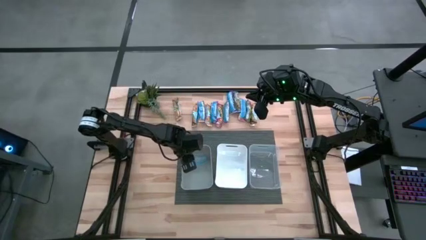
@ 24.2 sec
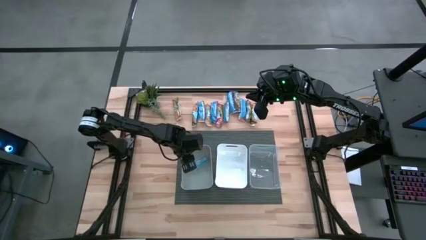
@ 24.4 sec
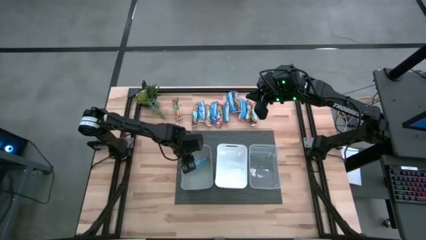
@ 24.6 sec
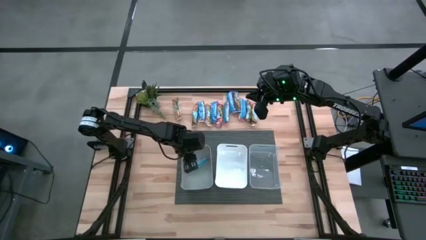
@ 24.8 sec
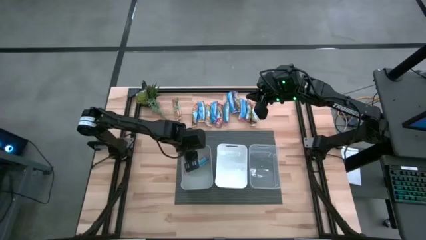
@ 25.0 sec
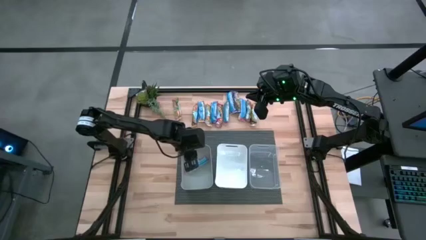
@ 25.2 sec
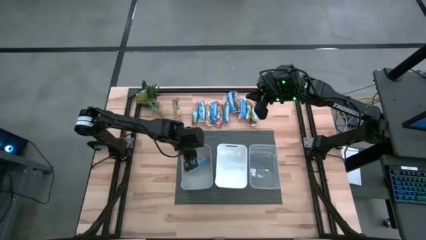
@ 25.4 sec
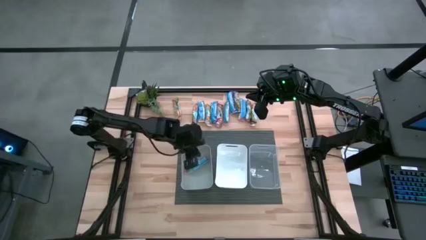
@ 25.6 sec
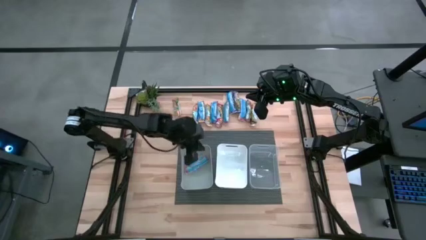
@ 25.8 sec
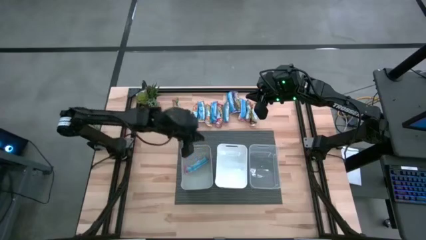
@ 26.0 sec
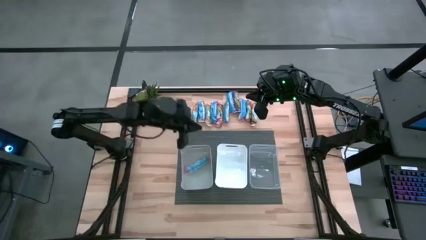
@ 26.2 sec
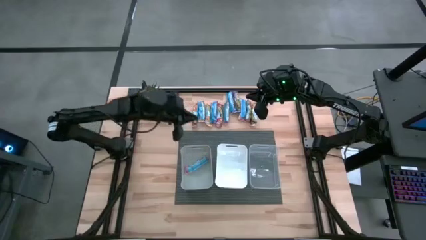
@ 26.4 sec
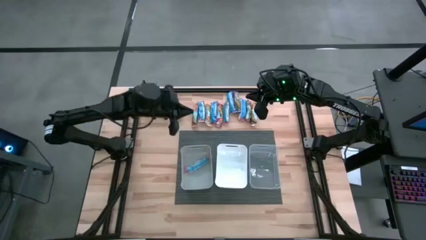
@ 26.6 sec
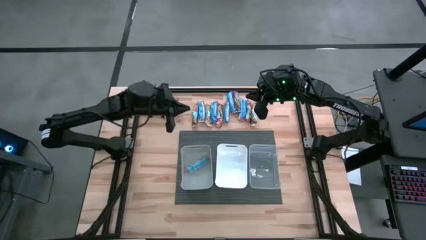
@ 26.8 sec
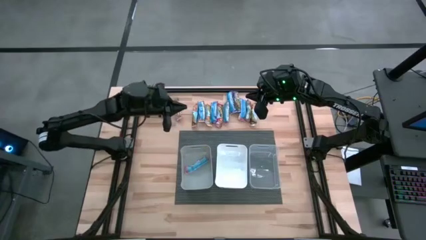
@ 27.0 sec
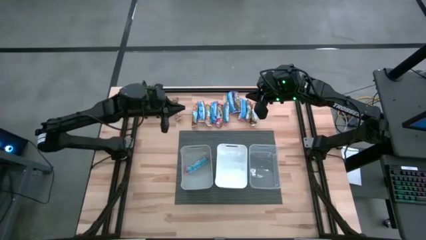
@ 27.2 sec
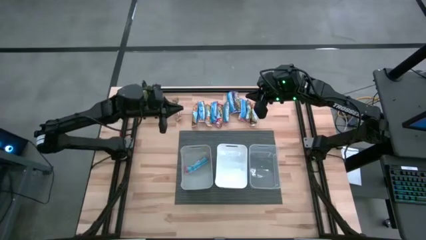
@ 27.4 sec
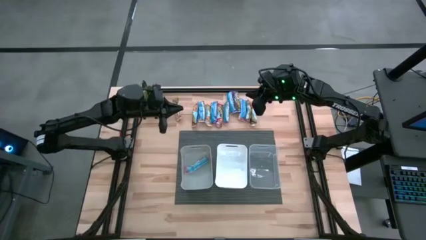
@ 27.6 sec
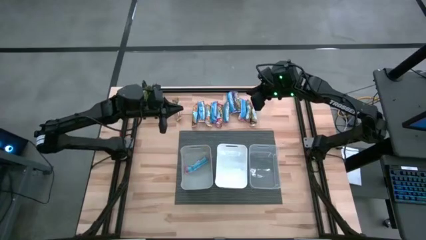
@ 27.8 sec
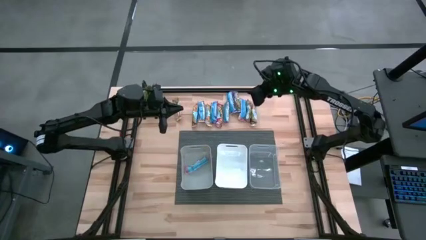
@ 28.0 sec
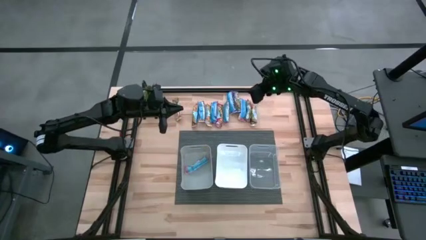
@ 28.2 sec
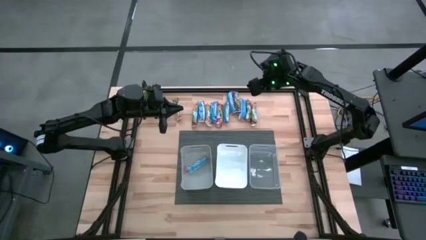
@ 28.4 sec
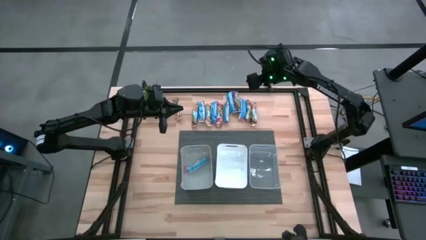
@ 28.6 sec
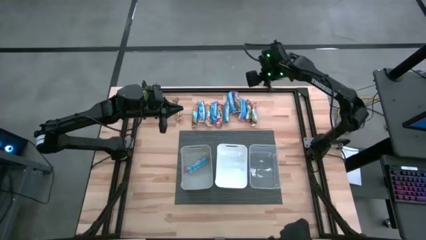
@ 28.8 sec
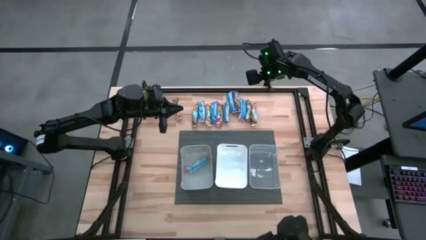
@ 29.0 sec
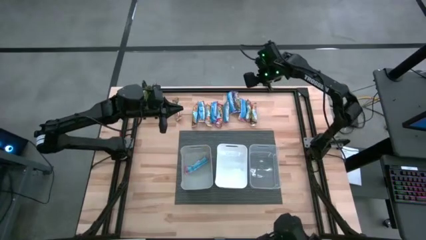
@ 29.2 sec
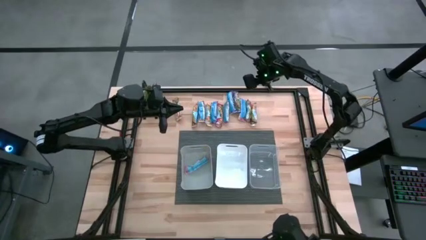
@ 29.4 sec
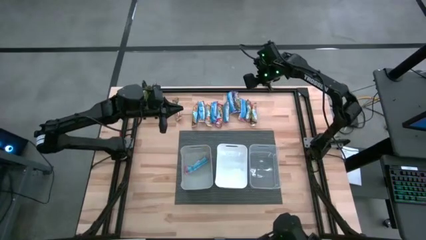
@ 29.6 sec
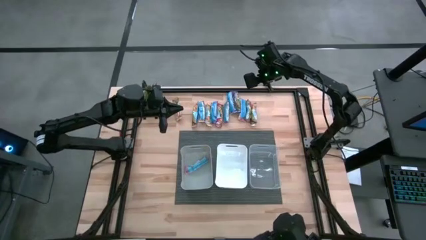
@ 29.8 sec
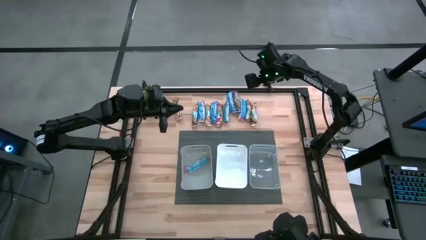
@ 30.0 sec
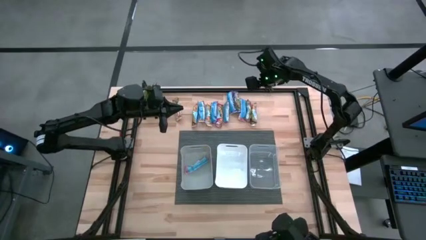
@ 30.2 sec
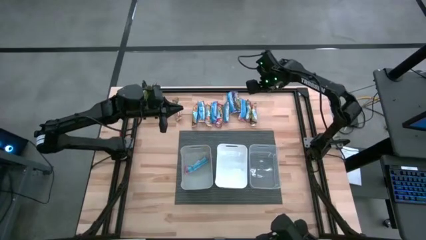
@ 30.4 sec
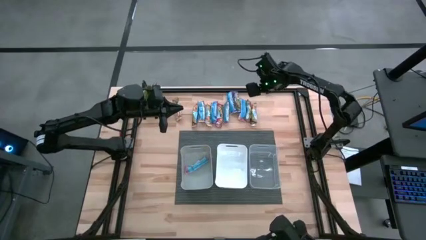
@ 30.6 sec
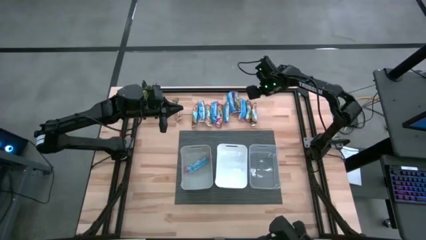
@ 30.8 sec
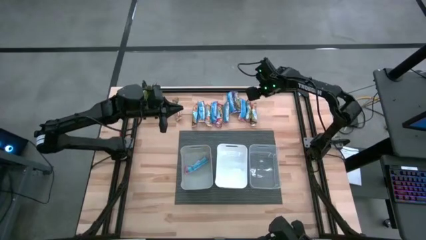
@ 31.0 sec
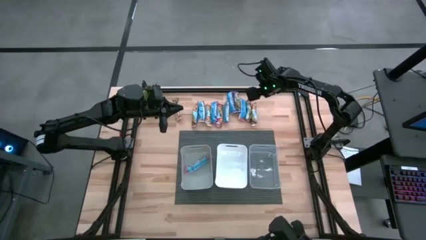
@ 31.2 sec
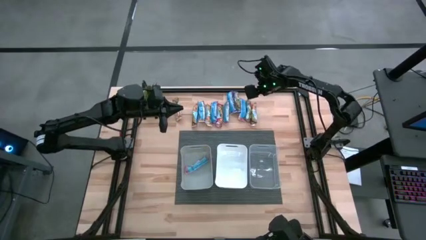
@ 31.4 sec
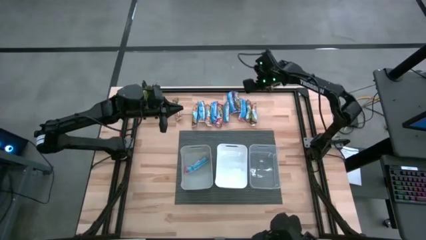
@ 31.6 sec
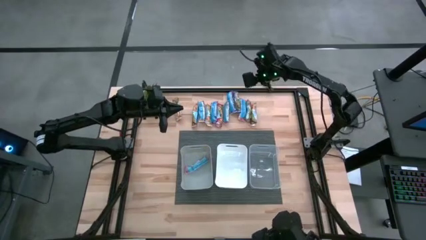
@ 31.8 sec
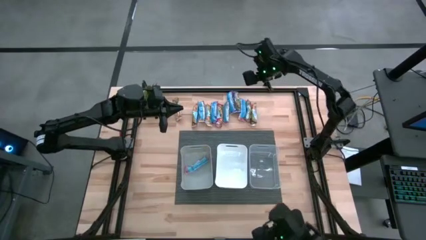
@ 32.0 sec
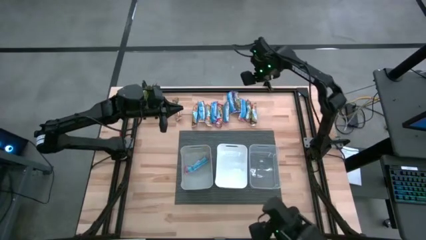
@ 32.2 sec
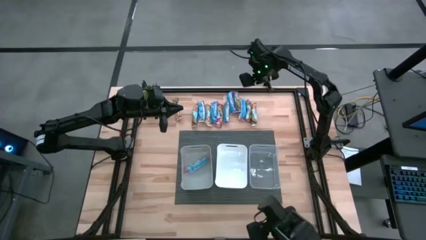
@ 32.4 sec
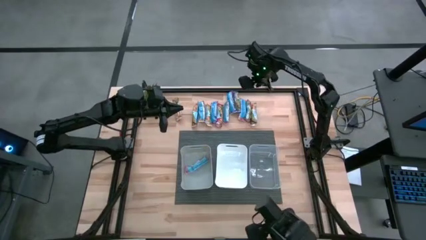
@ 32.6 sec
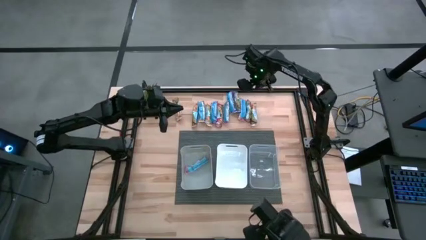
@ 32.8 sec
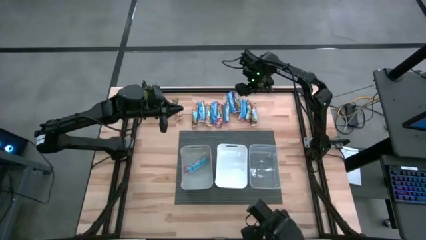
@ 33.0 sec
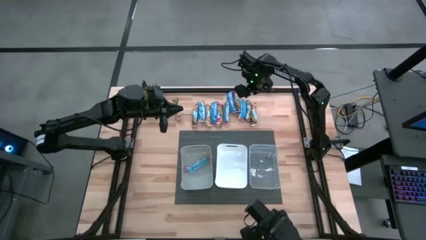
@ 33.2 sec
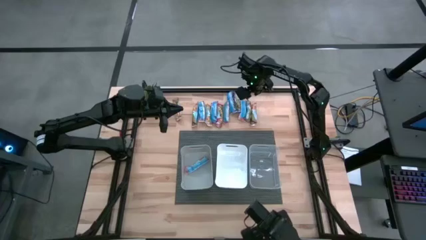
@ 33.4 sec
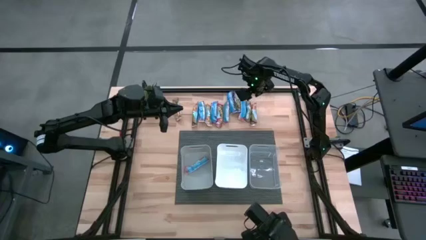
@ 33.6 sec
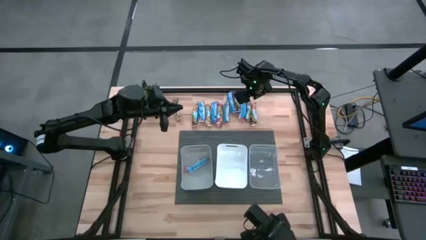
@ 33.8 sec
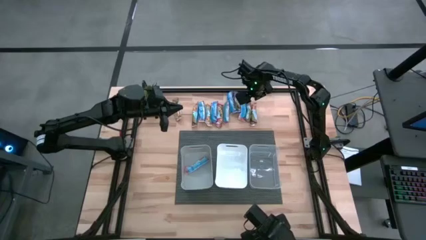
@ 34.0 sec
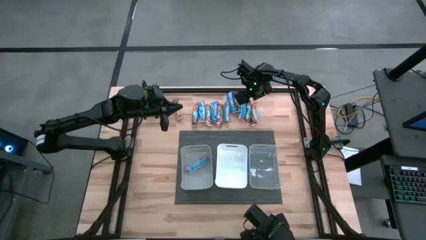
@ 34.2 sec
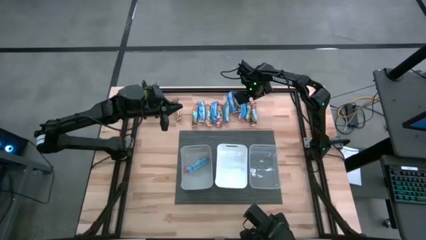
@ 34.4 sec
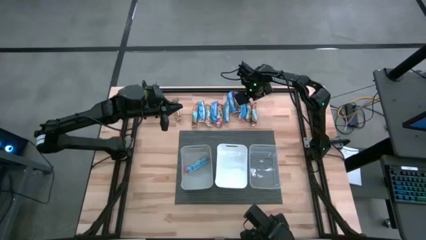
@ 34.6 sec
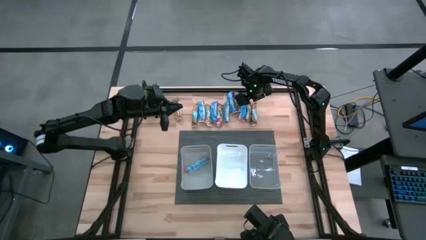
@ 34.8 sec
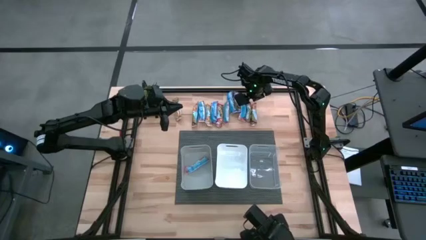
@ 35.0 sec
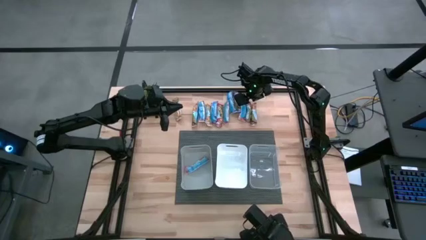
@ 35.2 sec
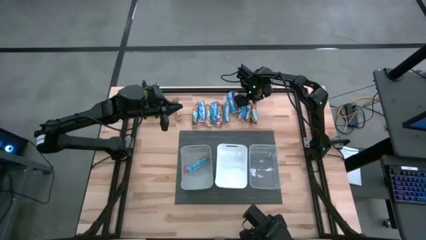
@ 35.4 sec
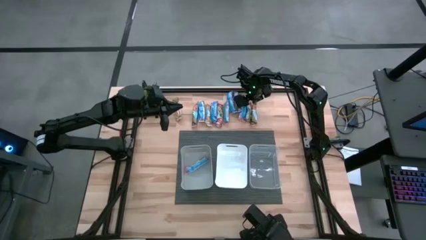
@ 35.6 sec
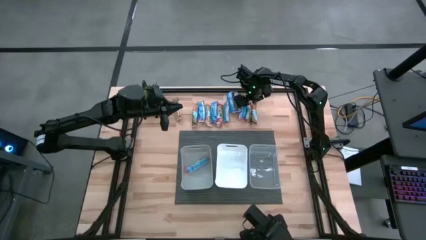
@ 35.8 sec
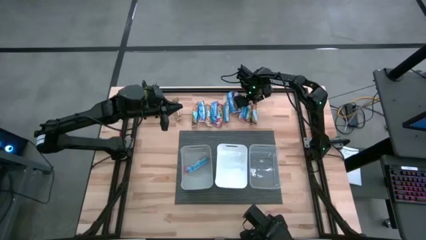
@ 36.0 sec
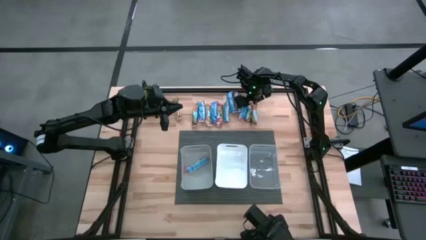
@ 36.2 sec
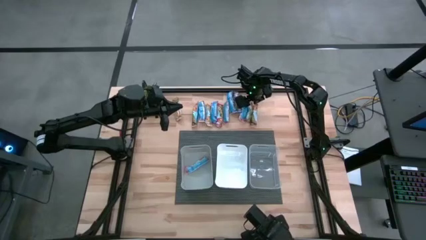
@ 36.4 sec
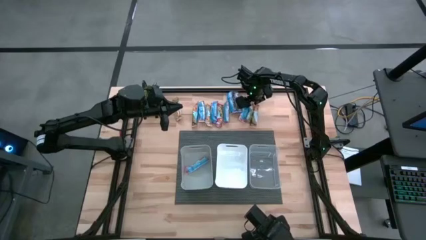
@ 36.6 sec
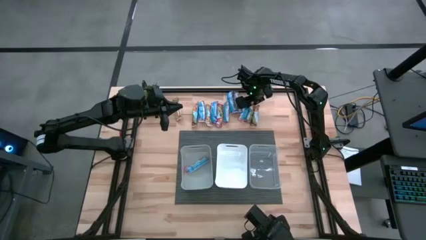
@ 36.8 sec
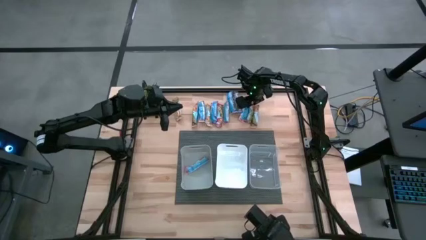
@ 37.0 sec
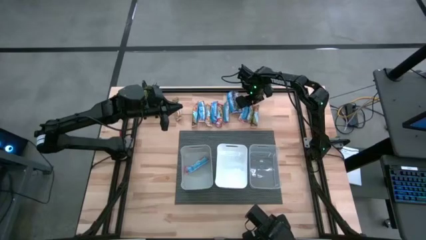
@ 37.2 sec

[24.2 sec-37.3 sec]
Task: Pick and place Granola Bars by type
Put the red granola bar into the gray bin

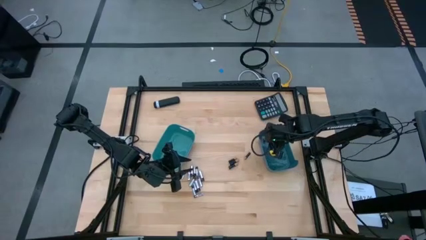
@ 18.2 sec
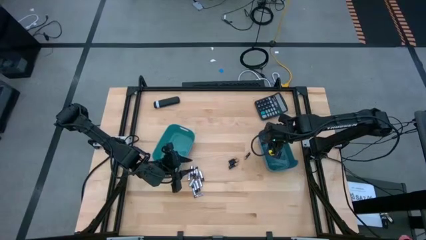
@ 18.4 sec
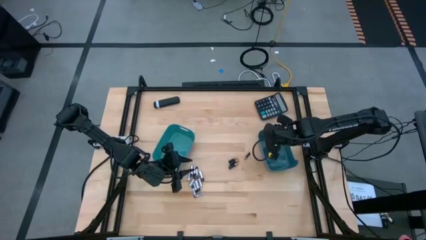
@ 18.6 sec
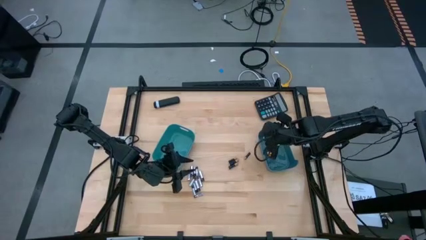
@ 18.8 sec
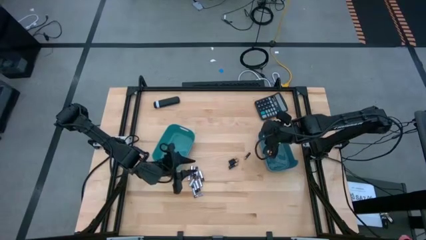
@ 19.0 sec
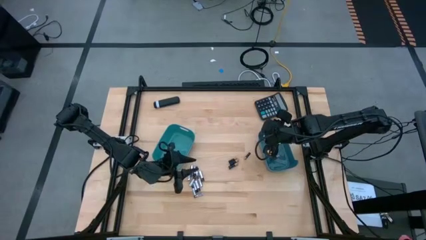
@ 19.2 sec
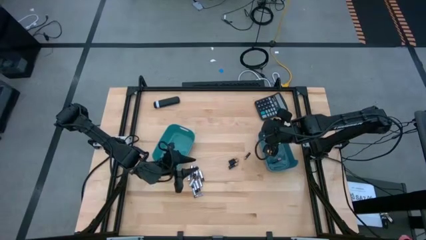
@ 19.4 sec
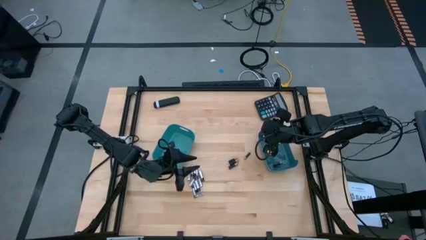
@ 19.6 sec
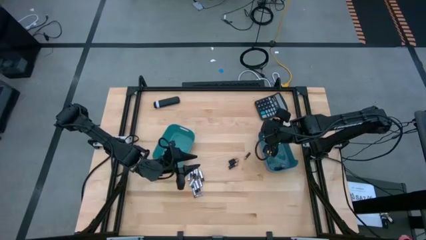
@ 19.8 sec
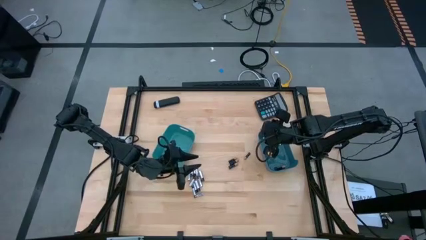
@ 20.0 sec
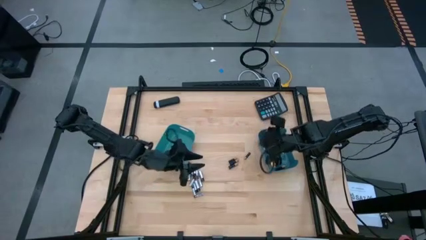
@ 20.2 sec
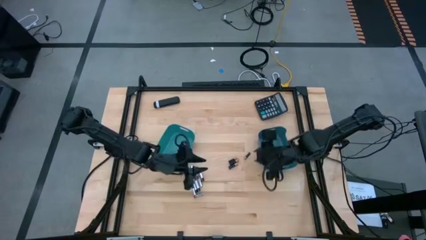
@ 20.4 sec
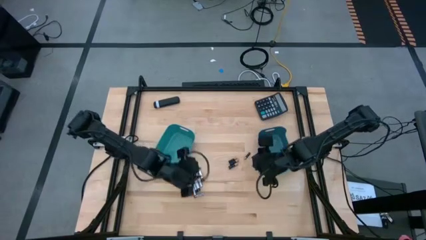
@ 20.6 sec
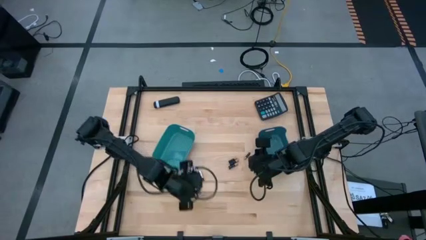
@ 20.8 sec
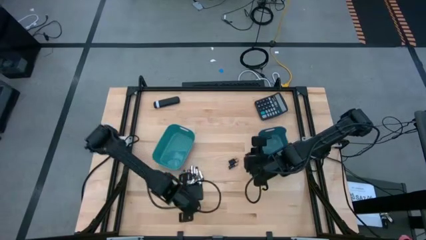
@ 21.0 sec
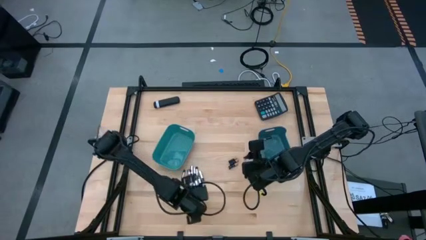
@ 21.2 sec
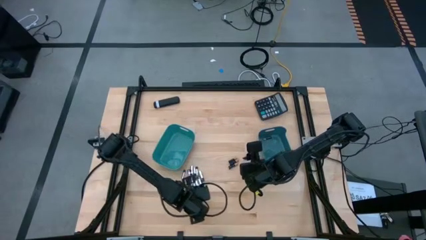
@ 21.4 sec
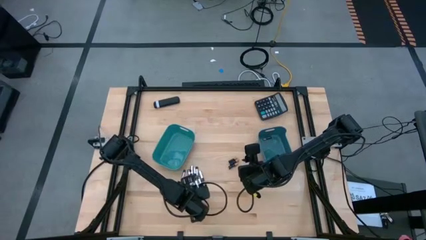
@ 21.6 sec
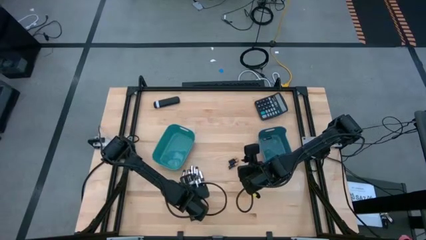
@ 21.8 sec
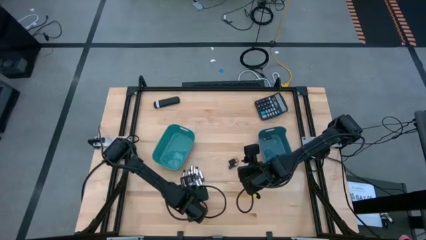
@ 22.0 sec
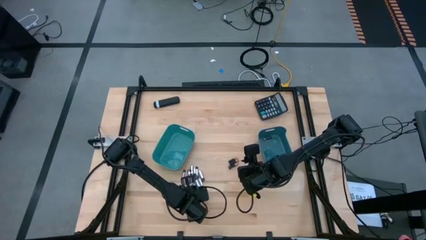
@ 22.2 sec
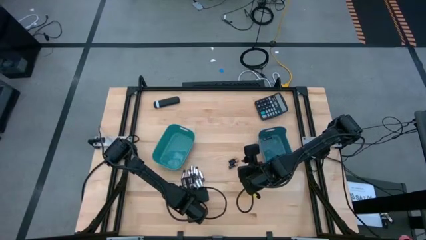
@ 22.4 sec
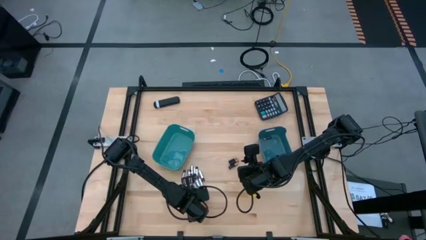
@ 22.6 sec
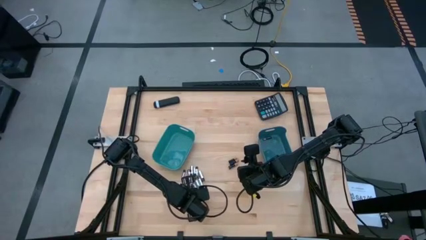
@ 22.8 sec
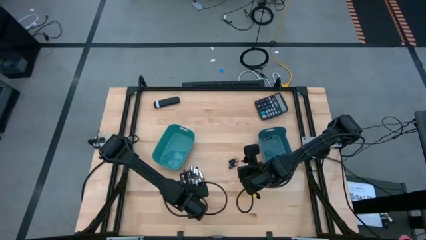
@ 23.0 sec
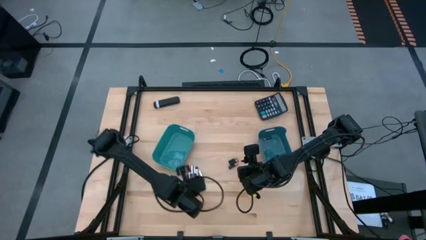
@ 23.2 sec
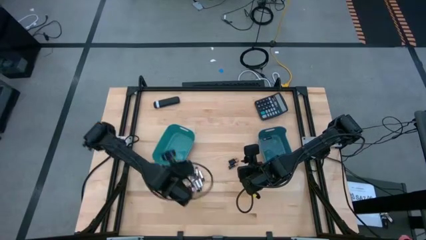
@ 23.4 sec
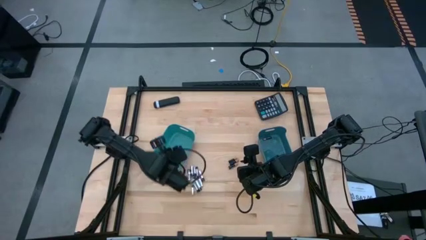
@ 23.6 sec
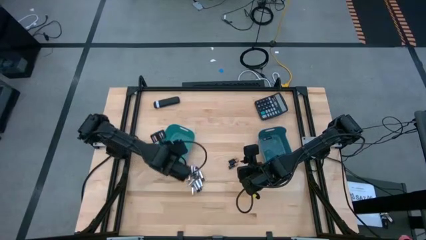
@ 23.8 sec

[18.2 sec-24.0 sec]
Task: Sort batteries
Put the white battery into the green bin
